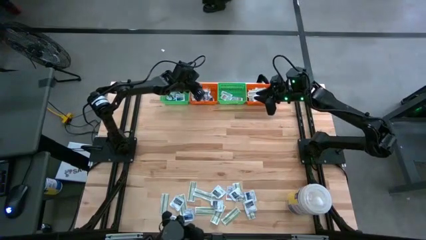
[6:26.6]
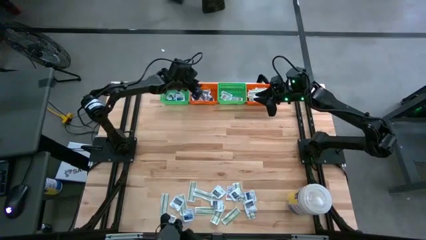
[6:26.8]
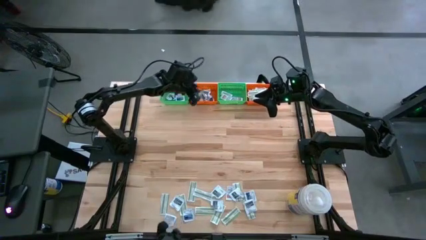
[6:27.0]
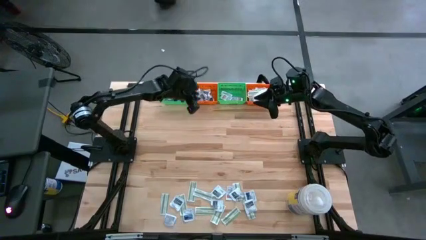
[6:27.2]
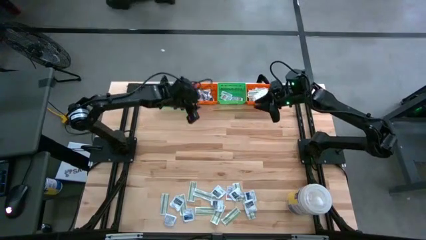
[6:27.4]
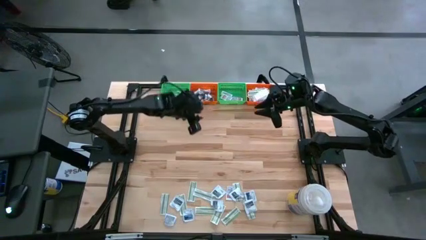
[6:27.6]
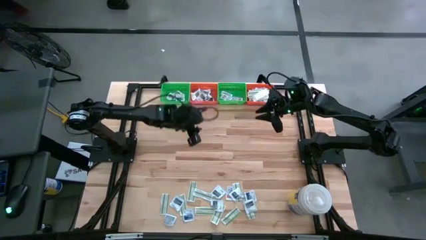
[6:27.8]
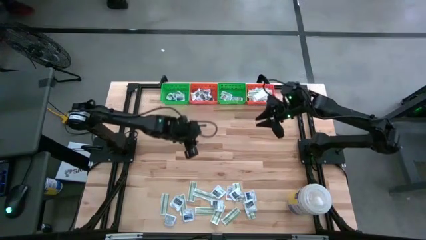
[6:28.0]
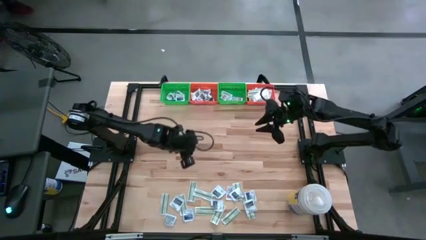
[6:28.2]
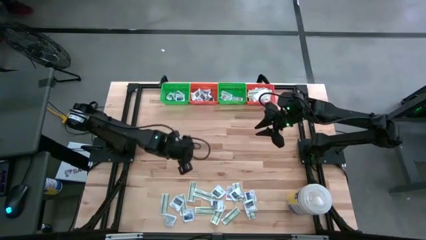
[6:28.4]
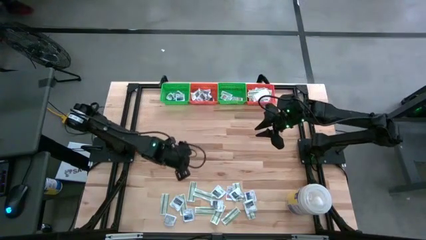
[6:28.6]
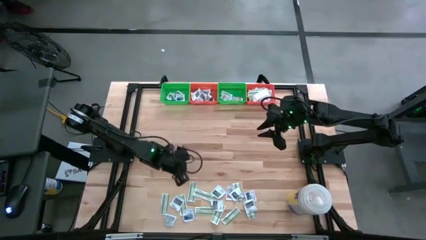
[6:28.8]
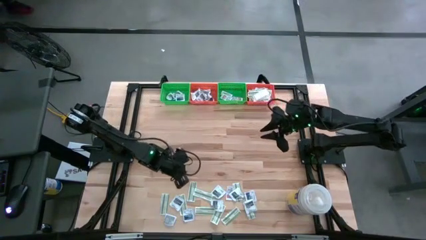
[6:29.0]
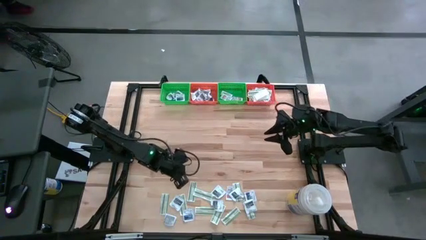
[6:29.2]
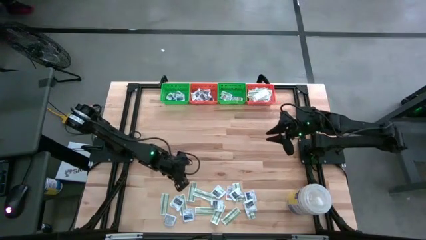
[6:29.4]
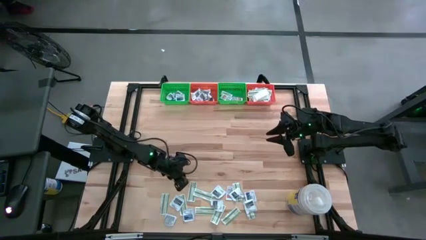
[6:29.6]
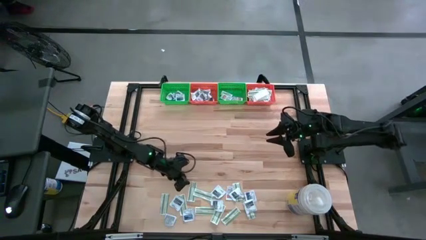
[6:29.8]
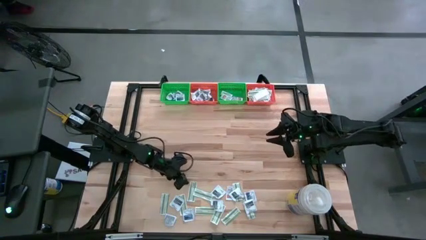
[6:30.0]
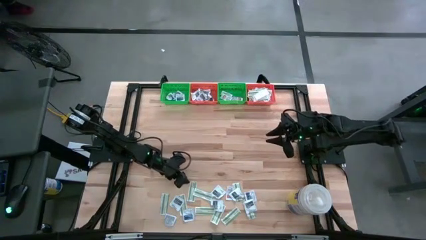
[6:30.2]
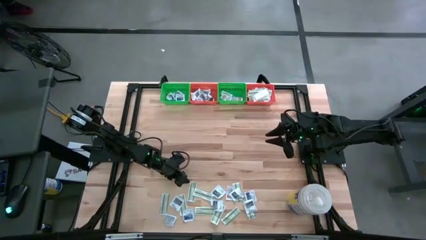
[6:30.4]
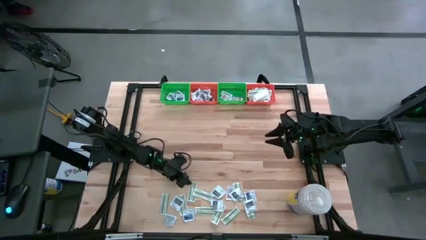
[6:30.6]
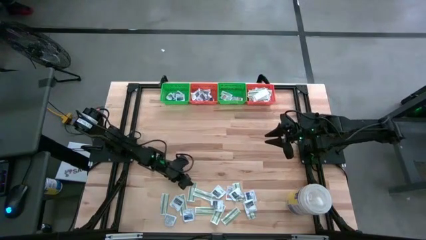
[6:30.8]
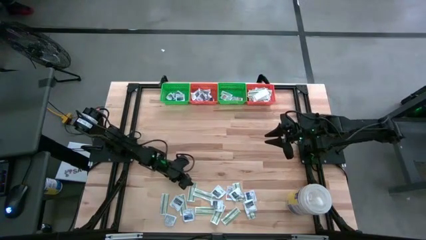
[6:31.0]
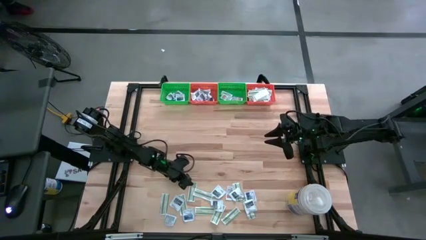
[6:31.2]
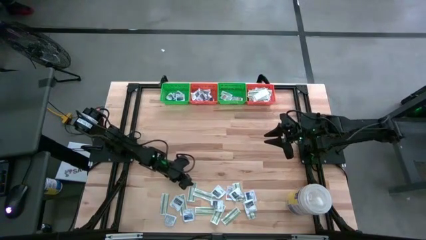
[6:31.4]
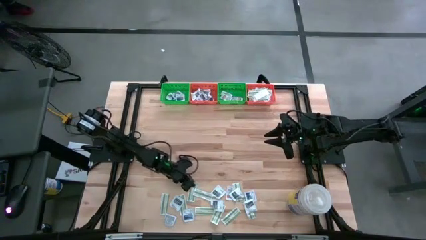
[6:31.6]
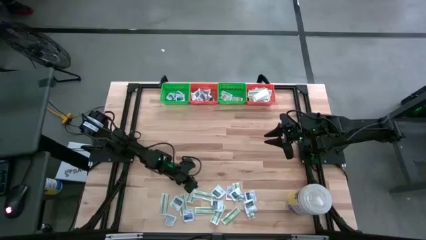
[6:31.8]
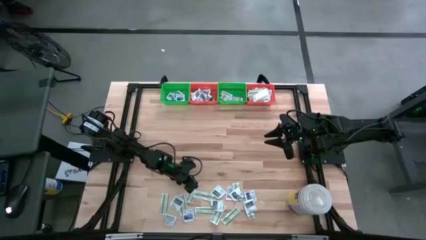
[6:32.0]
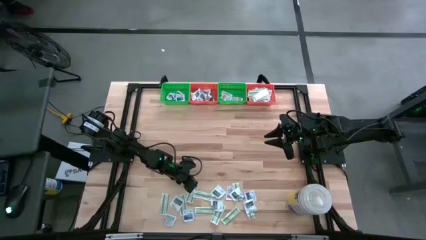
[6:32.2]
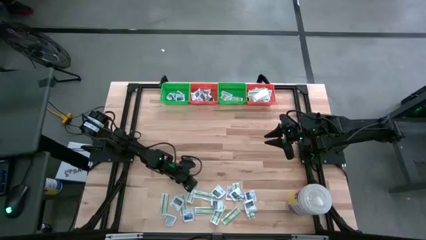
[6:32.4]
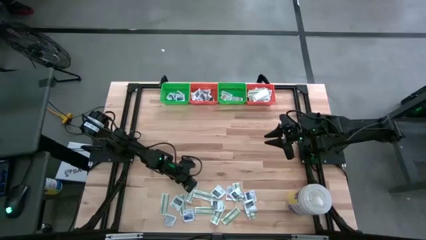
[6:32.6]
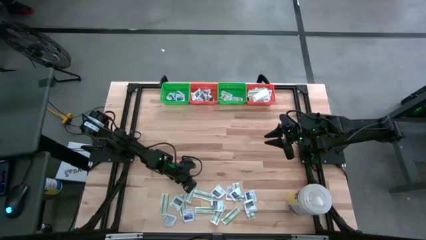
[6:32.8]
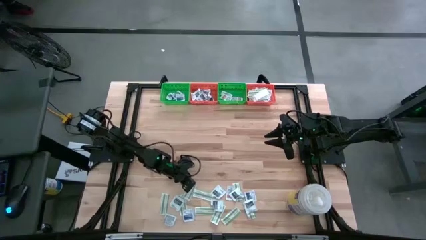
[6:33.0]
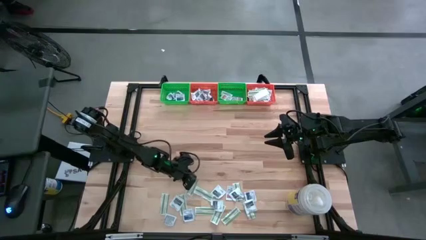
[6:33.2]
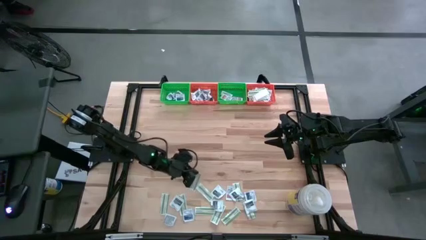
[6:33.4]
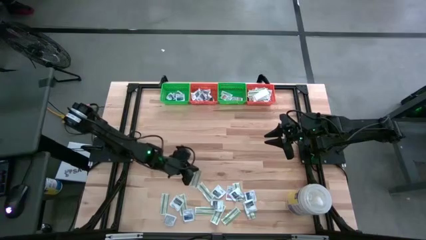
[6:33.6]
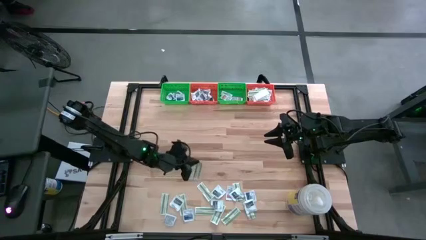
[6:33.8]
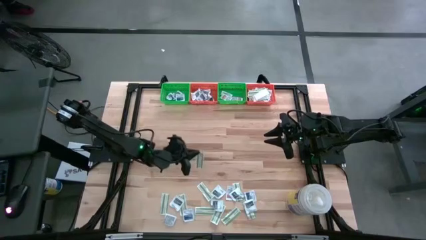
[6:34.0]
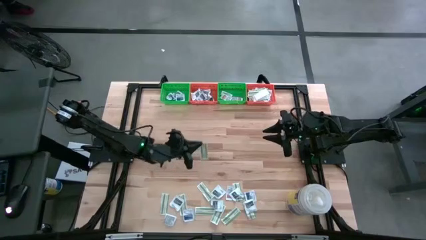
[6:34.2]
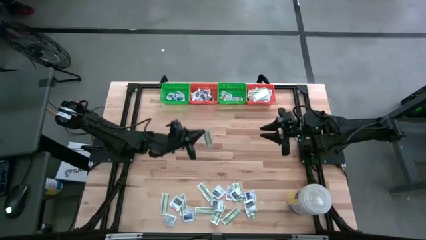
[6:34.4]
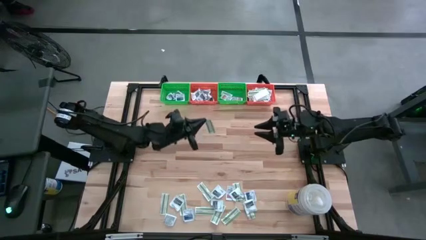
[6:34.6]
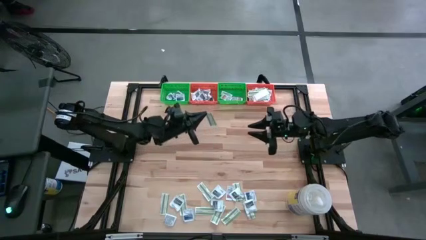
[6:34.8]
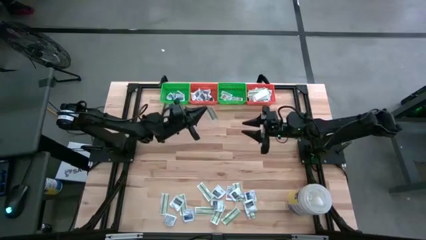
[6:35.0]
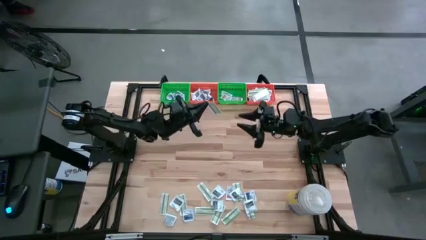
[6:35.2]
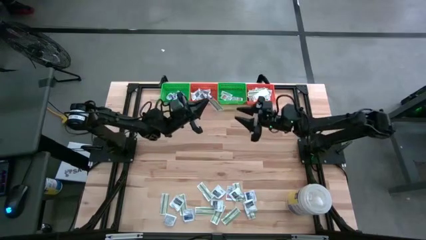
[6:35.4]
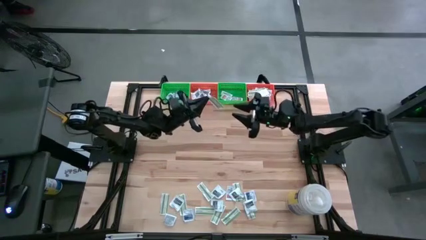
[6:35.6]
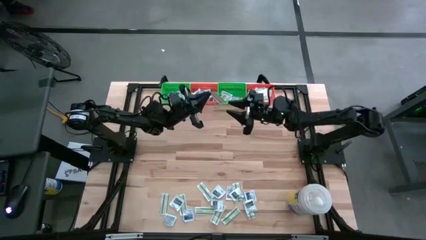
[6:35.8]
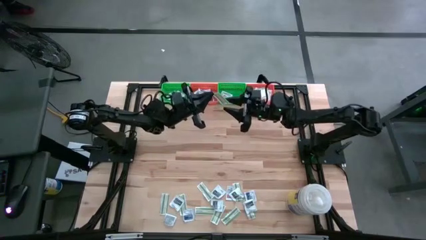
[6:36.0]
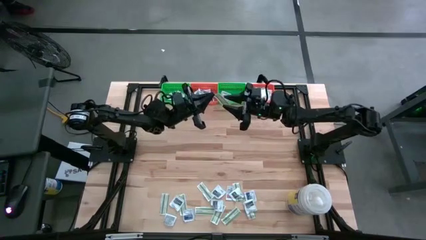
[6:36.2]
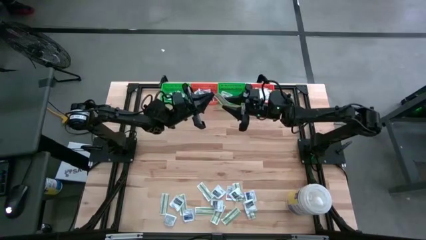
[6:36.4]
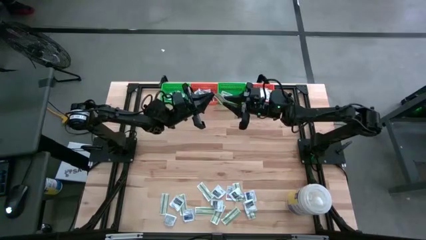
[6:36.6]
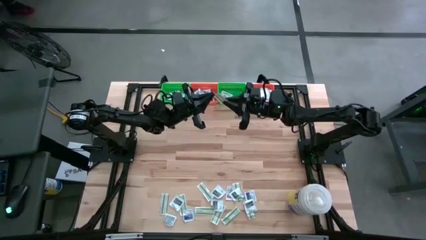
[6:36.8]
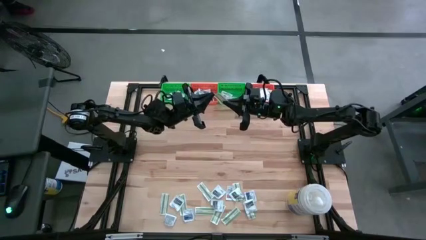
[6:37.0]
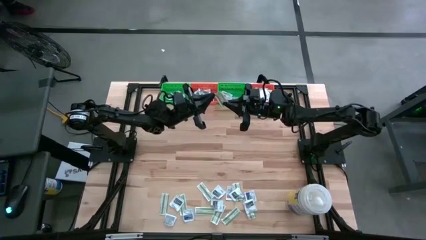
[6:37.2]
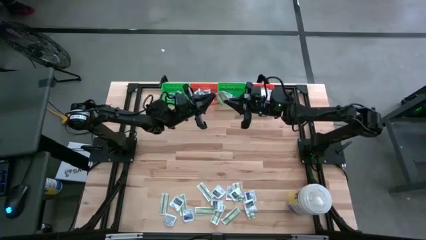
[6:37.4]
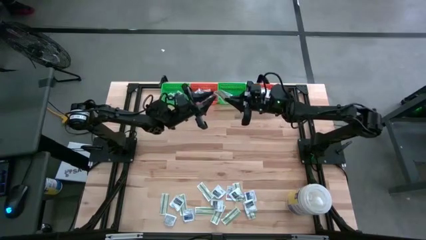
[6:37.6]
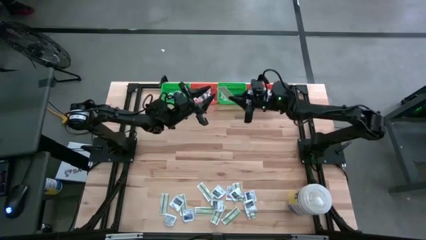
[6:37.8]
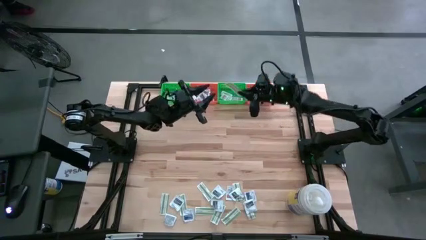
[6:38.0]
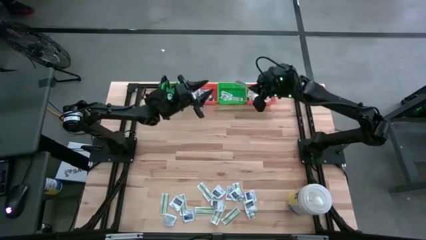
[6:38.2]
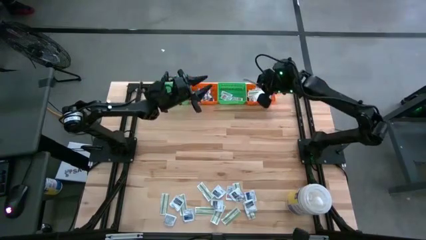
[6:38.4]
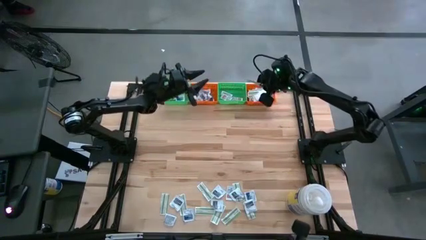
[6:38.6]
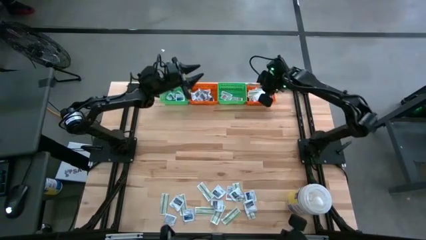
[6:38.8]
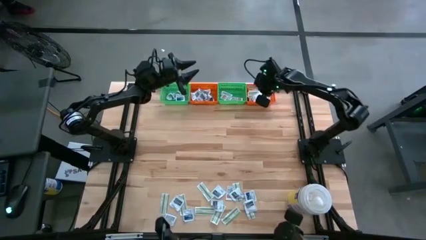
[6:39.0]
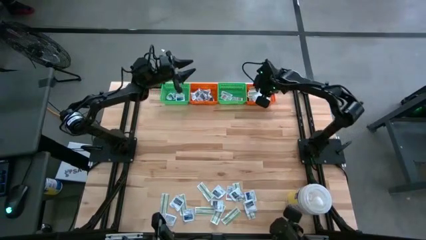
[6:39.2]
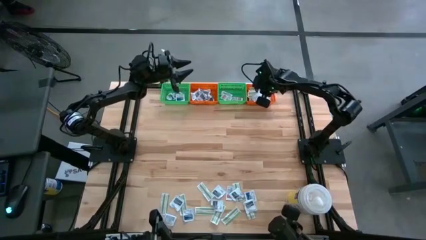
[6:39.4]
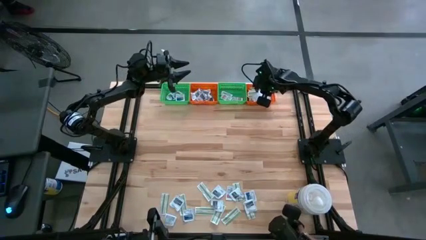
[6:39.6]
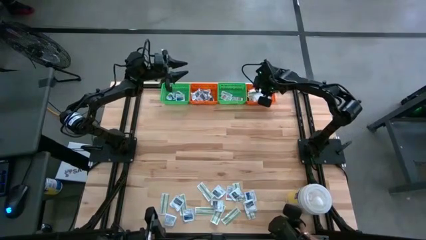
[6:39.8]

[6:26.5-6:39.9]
Task: Pick & Place First Aid Supplies
Put the green bandage pack in the right orange bin

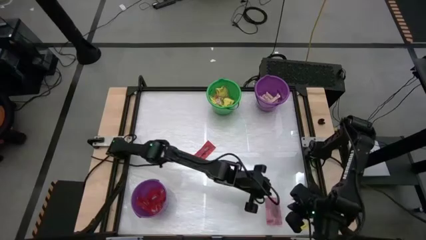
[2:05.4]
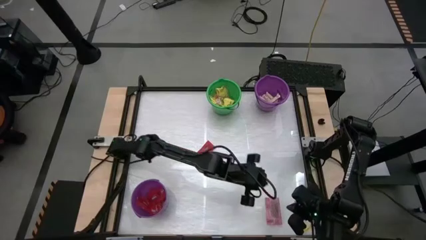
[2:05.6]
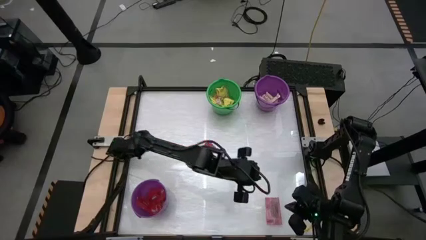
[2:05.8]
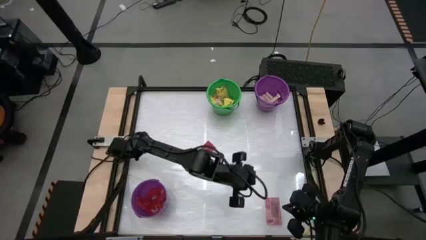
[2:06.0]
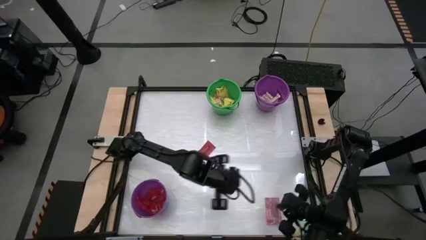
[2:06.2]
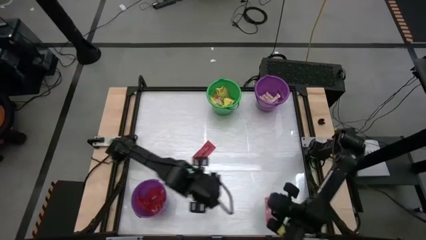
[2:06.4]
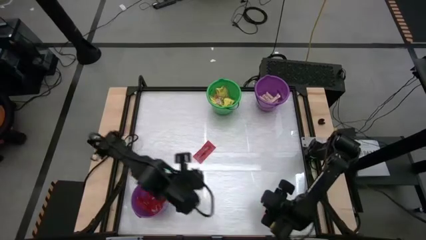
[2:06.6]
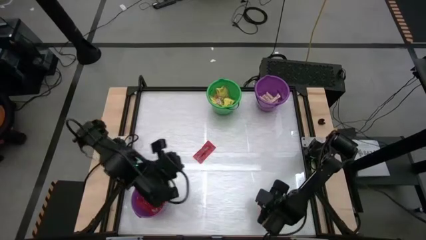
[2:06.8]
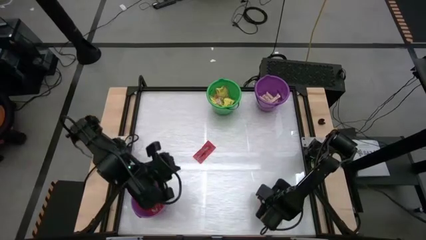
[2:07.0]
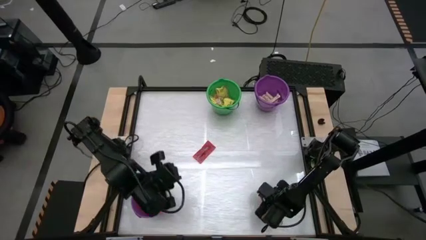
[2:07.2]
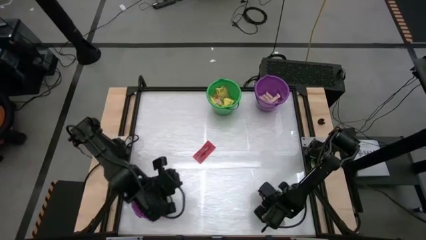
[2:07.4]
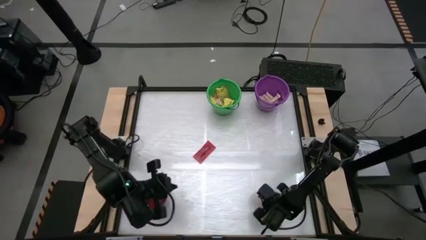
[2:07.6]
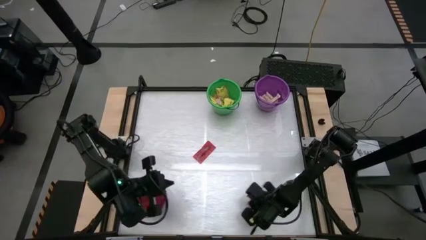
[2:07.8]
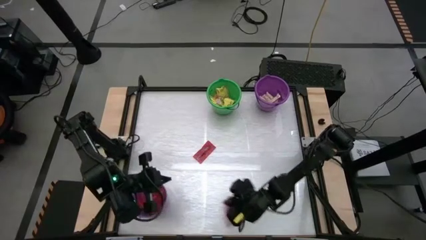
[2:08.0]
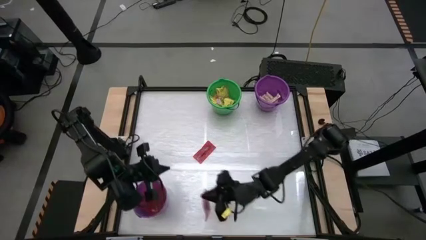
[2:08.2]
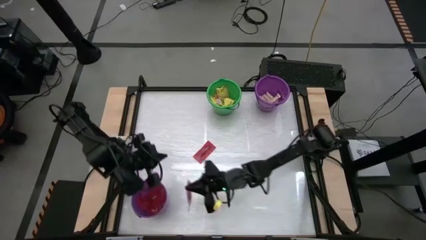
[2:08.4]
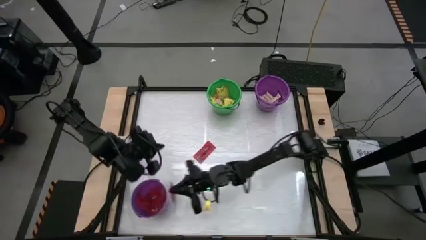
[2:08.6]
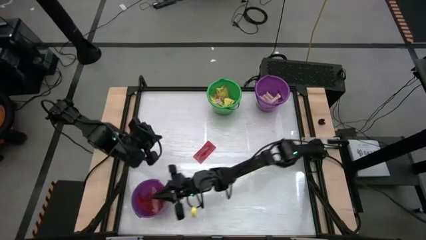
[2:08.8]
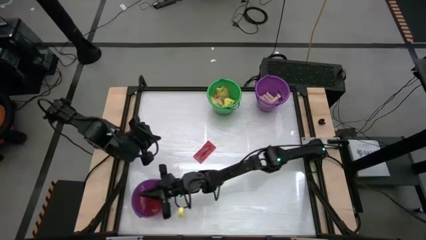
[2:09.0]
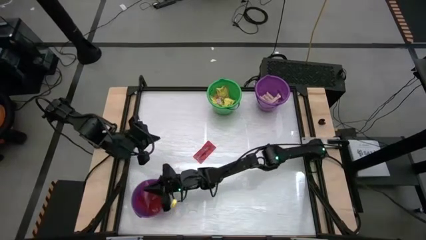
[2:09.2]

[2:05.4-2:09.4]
Task: Sort candy by brand, put in halloween buckets
Put the red candy into the bottom violet bucket
